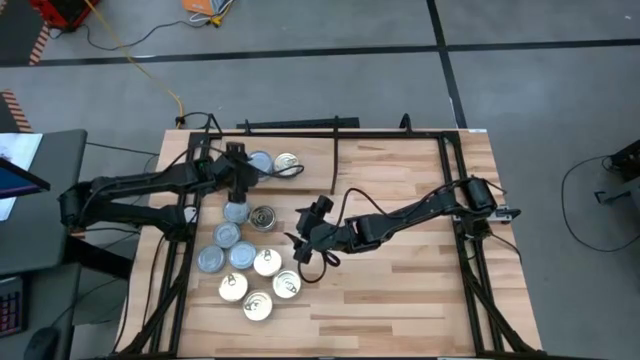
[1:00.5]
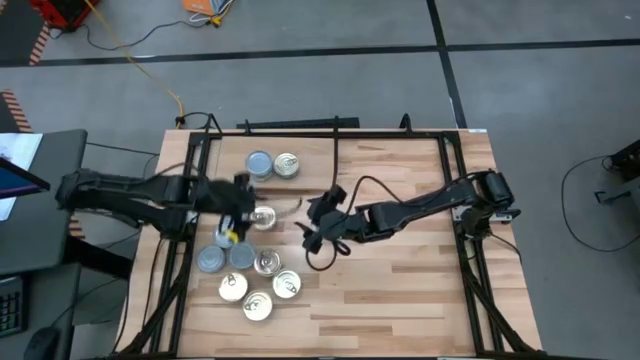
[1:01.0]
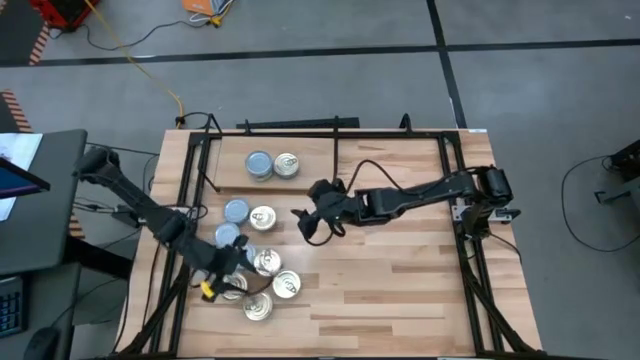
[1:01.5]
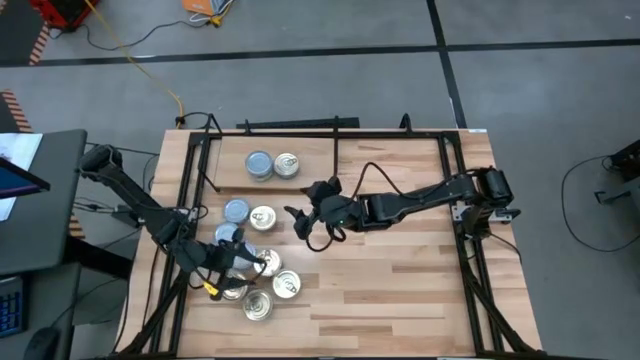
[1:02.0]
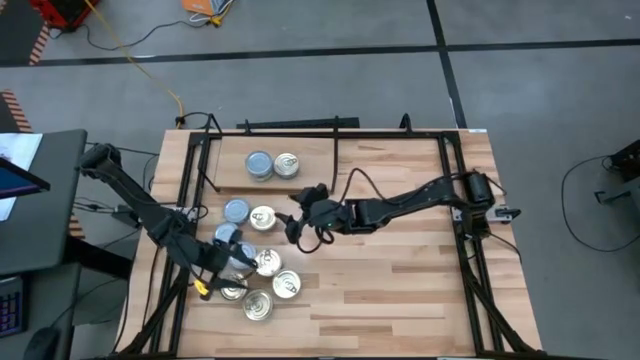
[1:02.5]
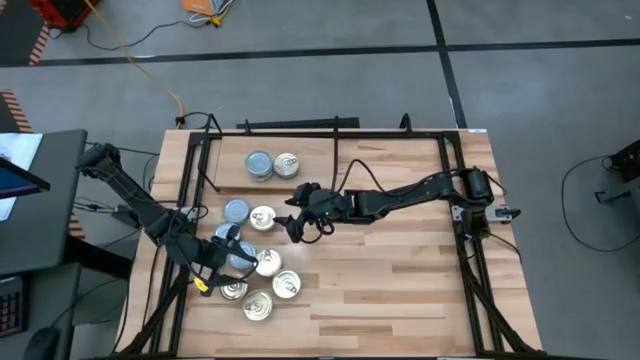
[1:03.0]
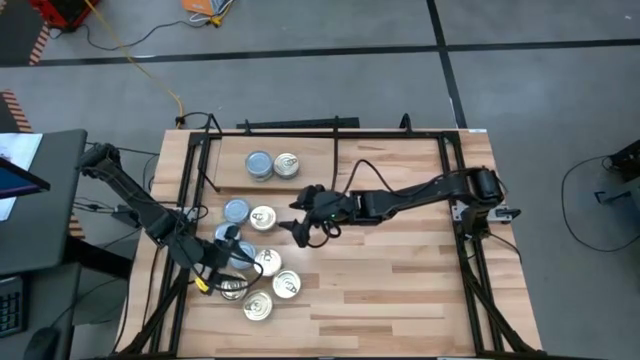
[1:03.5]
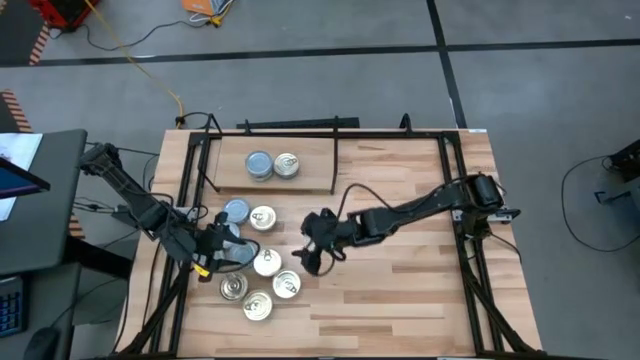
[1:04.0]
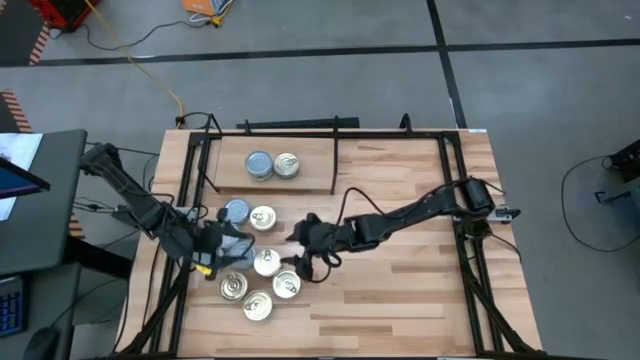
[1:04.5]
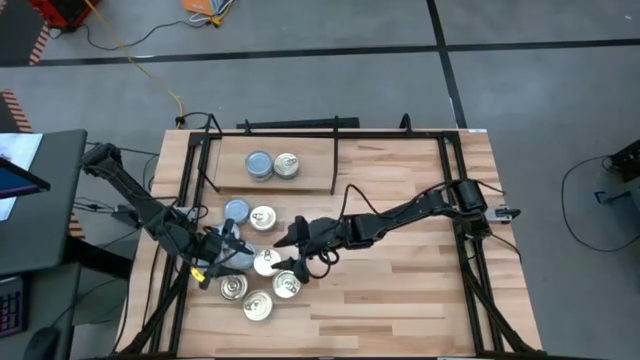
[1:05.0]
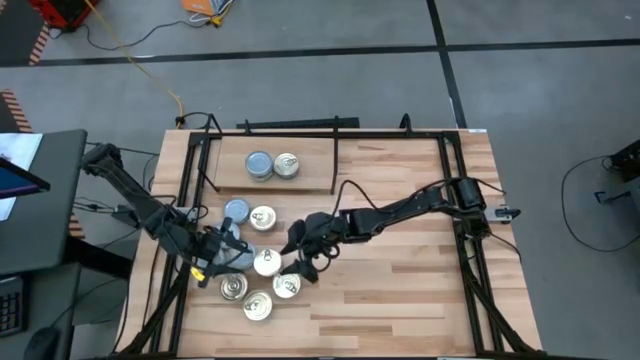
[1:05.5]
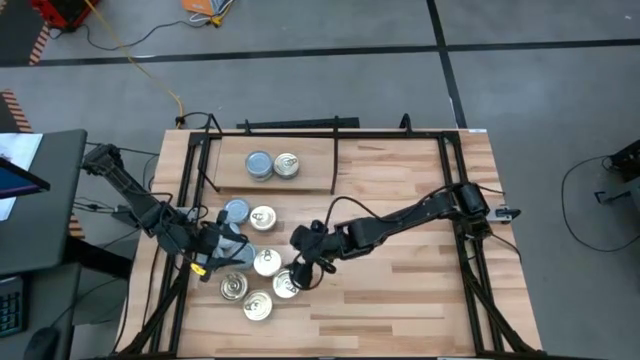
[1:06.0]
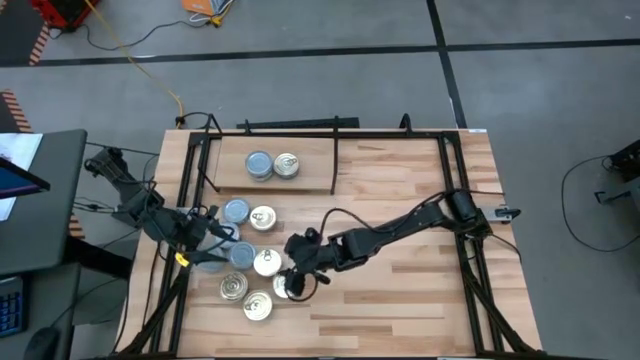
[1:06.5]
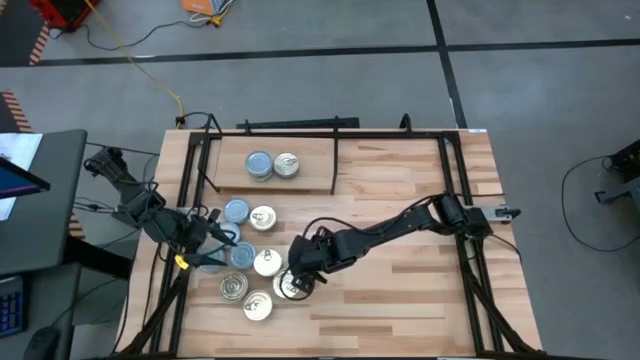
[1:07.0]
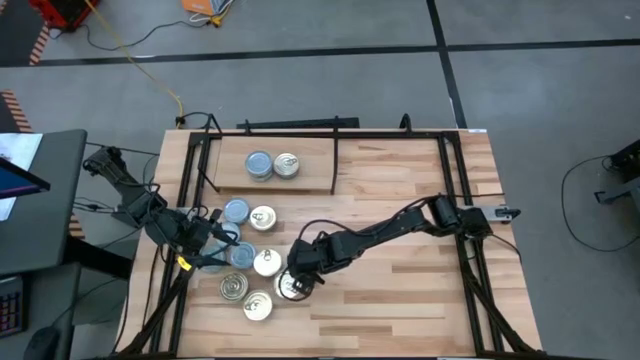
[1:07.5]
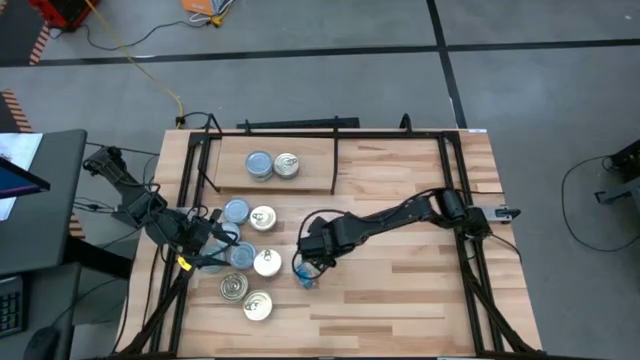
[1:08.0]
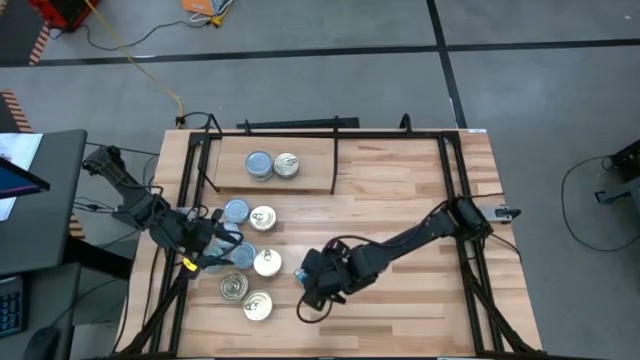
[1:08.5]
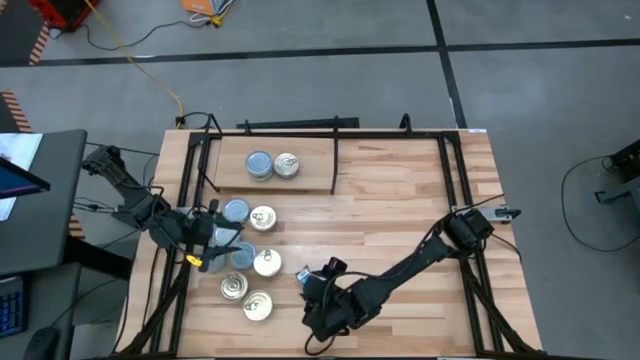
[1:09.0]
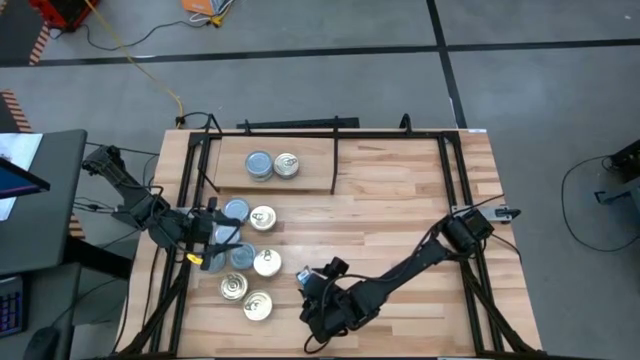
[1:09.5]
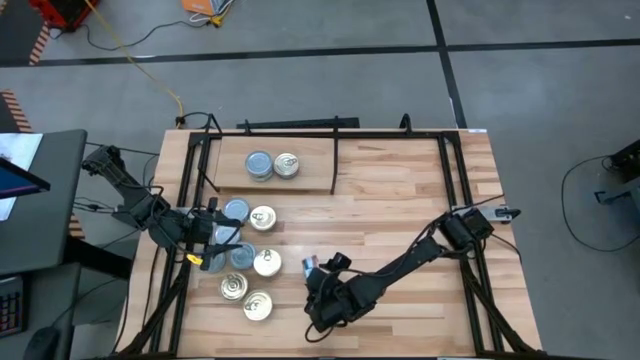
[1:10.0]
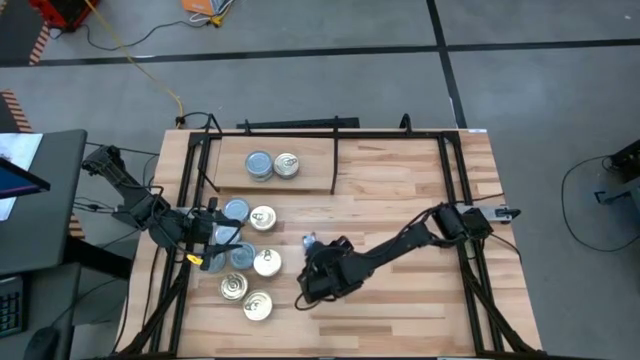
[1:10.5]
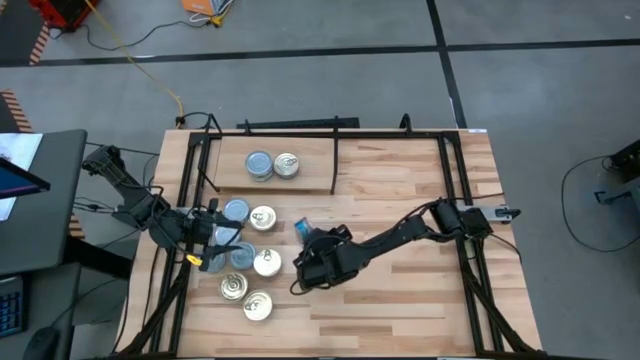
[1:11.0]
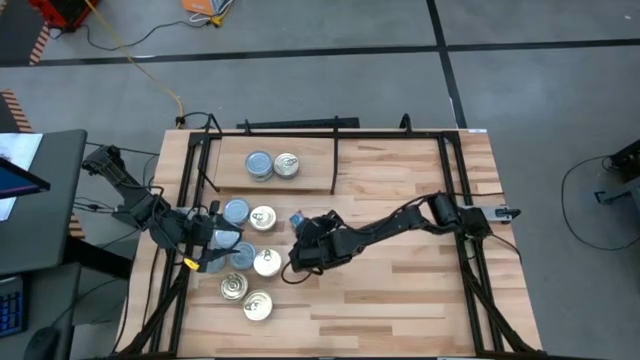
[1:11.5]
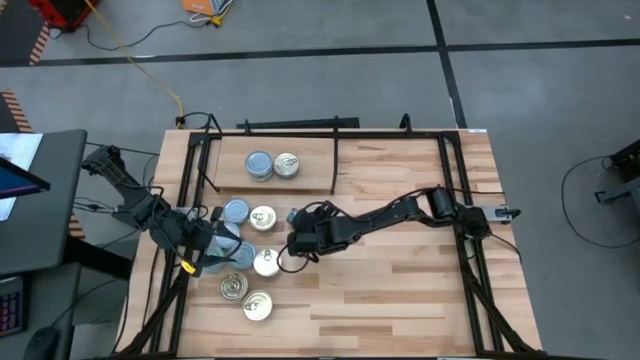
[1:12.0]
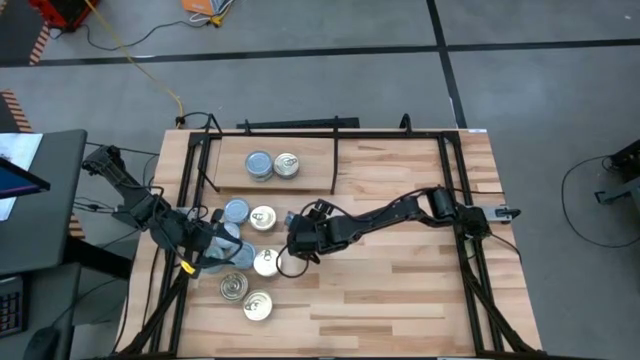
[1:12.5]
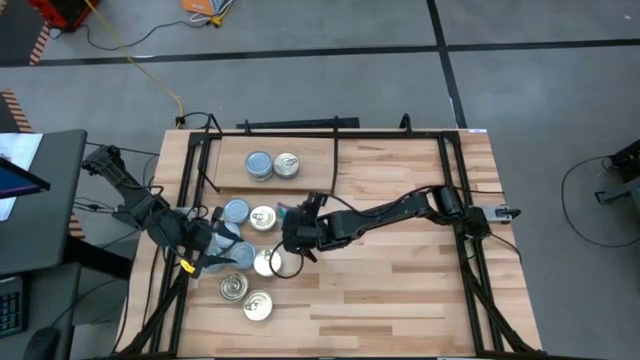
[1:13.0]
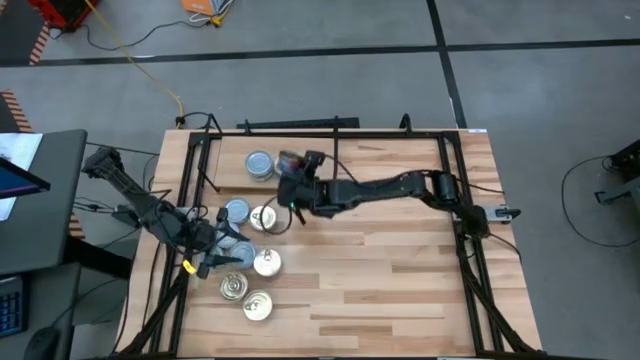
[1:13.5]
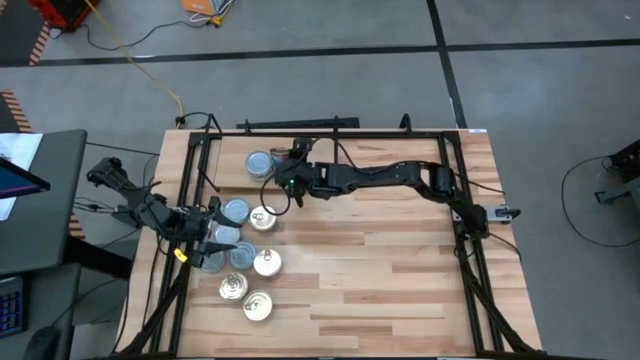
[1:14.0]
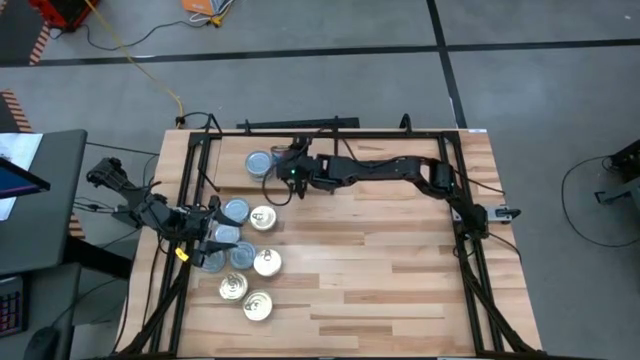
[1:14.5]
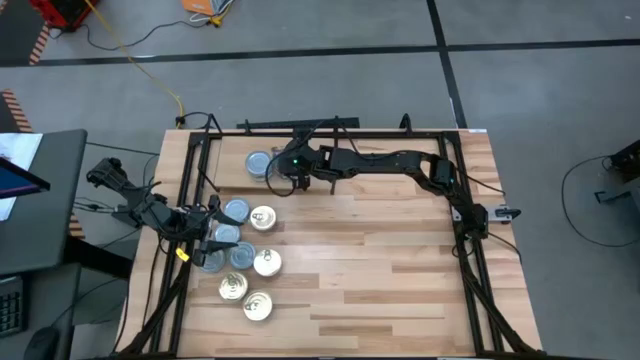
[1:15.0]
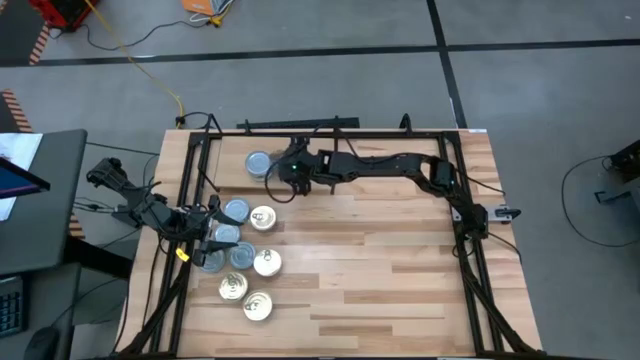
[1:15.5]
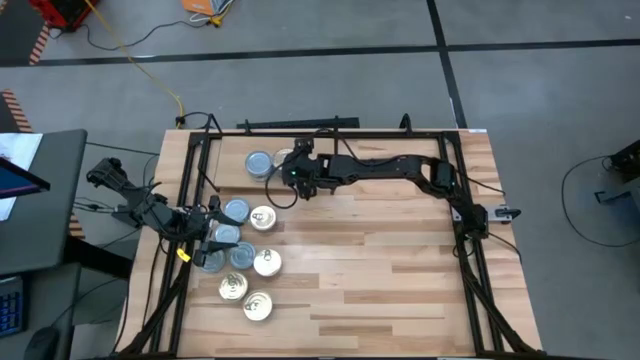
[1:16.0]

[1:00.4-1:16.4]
Task: Stack canned seafood by type on shelf
Stack the blue pink tuna can on top of the blue pink tuna can on the shelf

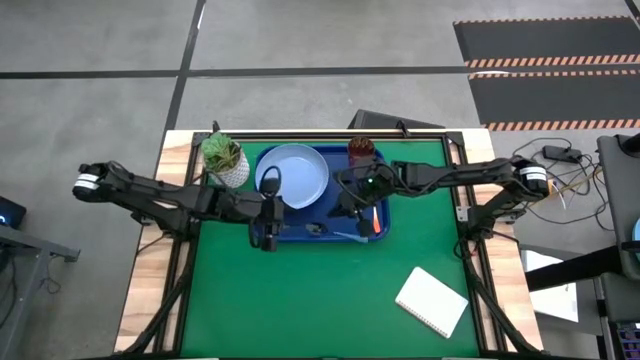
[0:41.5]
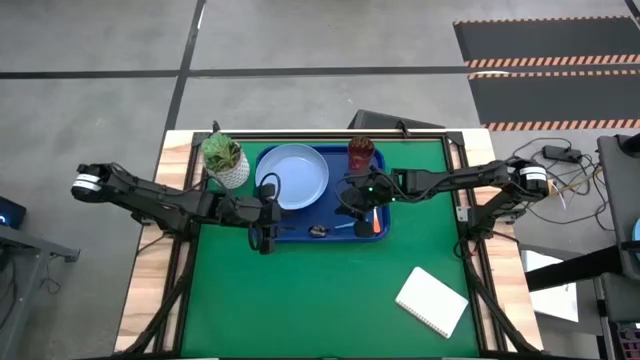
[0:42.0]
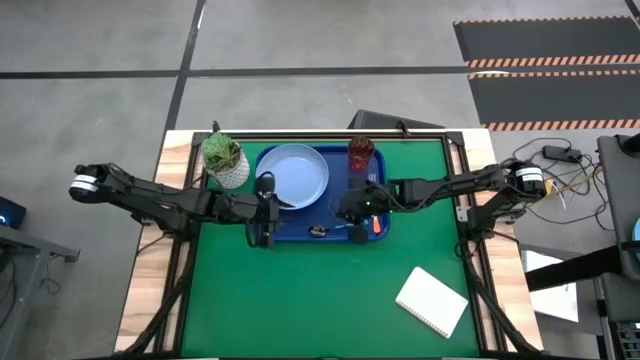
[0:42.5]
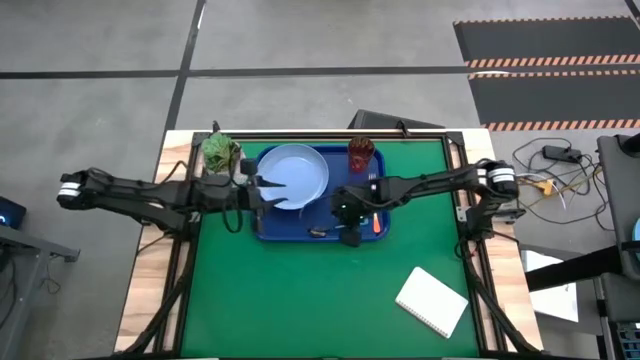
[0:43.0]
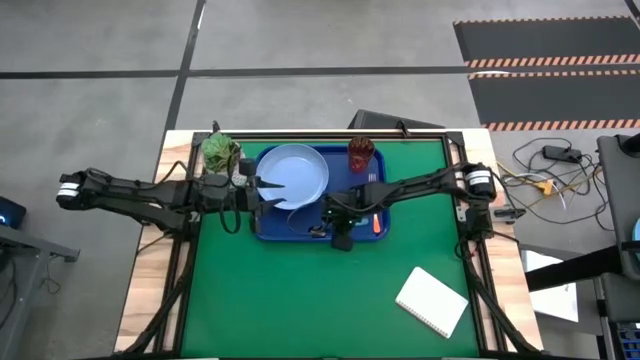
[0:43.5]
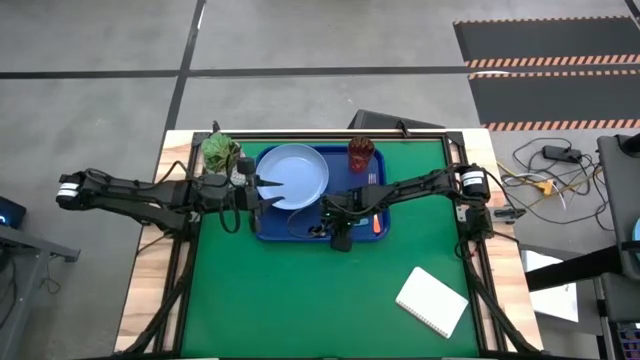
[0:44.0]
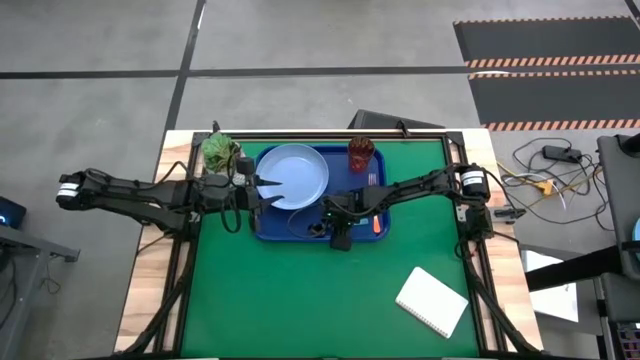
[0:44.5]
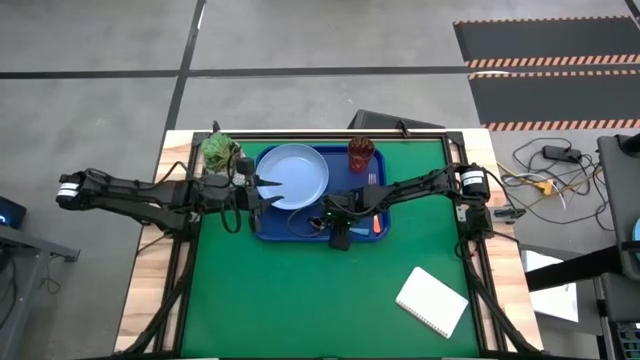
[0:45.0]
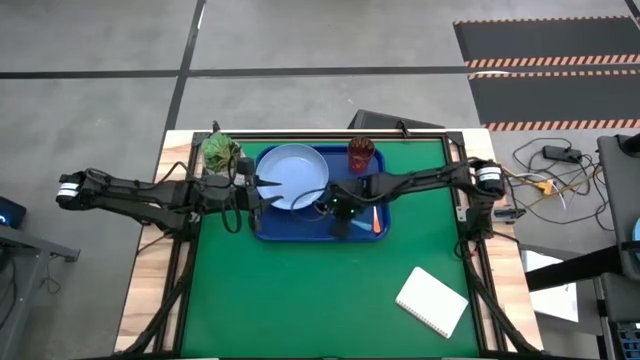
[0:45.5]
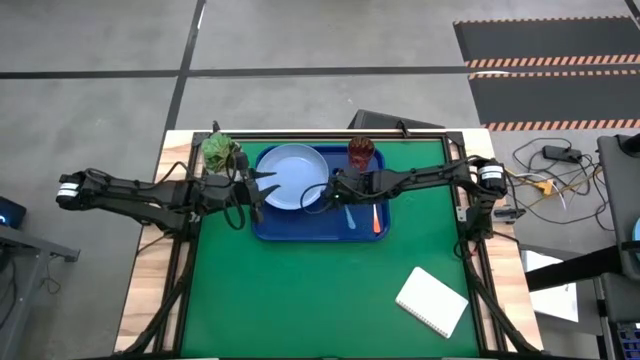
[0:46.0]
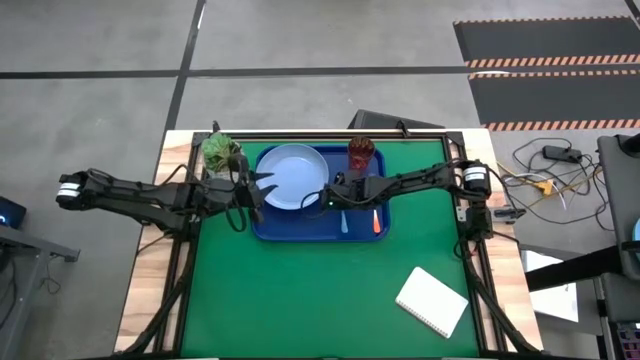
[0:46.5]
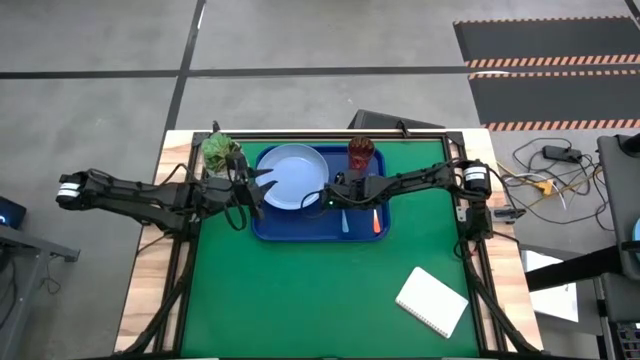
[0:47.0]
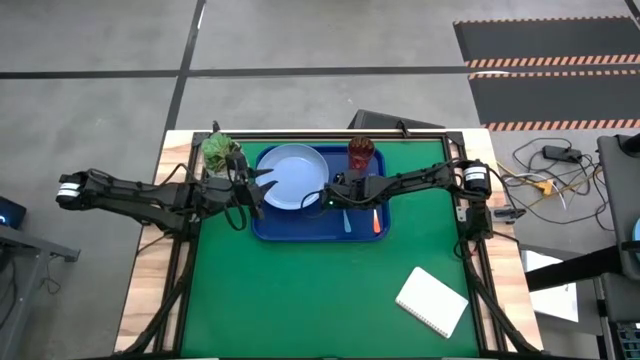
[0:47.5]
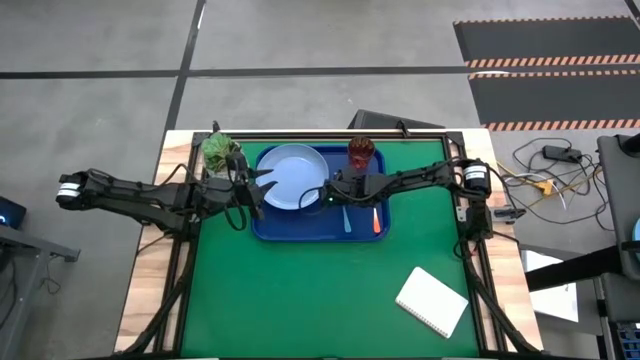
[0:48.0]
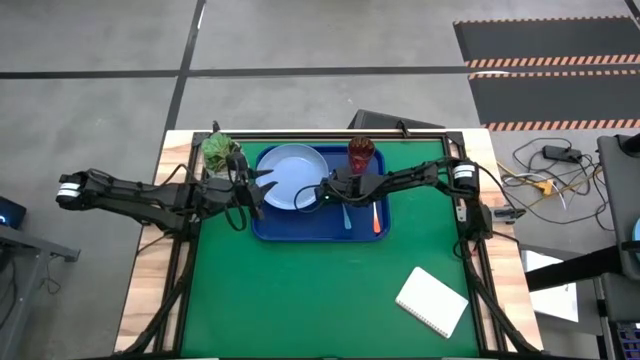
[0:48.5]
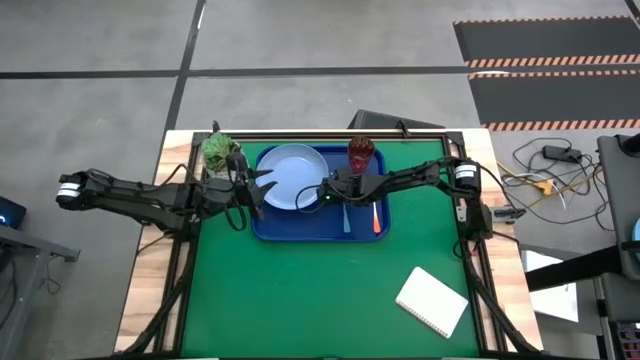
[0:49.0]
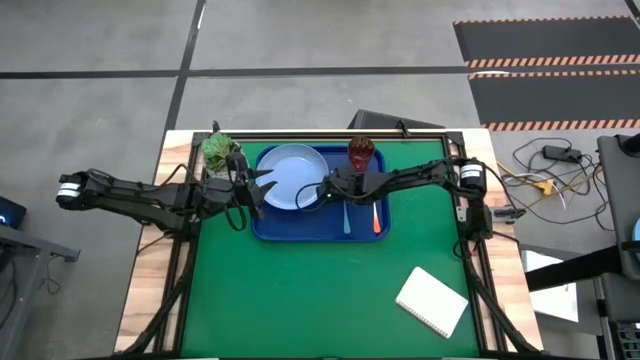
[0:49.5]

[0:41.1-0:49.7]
Task: Pick and place plate/cup/fork/spoon on tray
Put the light blue spoon on the blue serving tray
